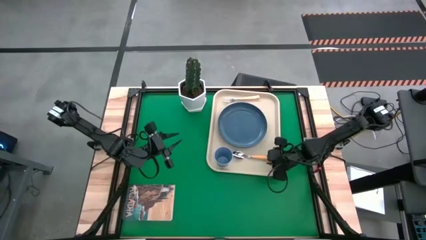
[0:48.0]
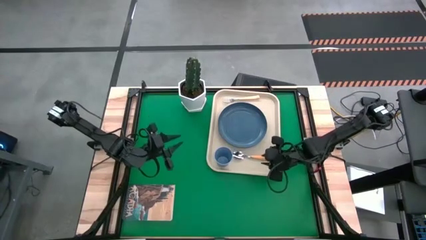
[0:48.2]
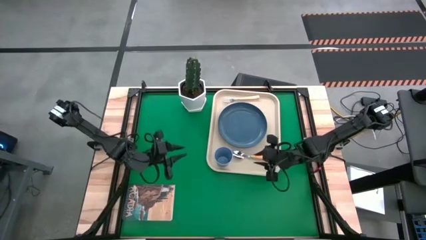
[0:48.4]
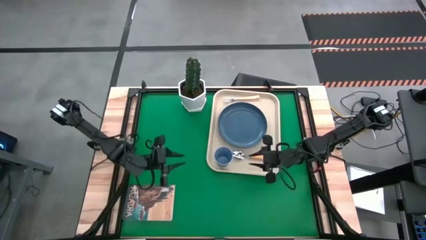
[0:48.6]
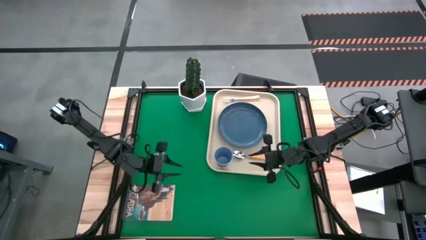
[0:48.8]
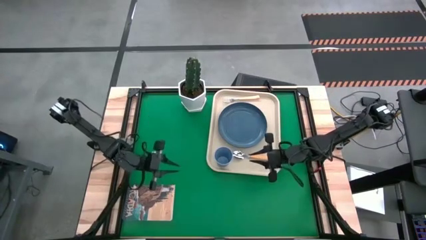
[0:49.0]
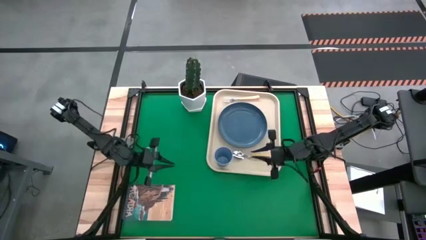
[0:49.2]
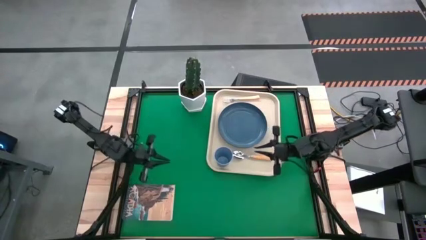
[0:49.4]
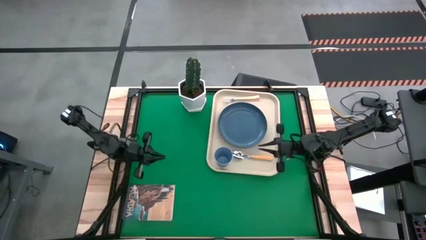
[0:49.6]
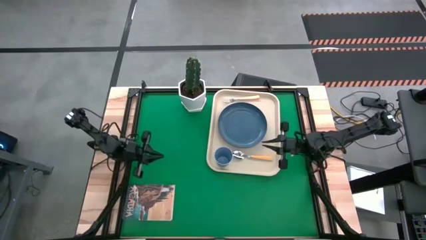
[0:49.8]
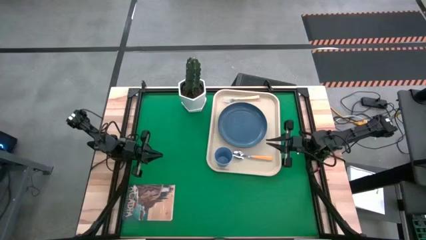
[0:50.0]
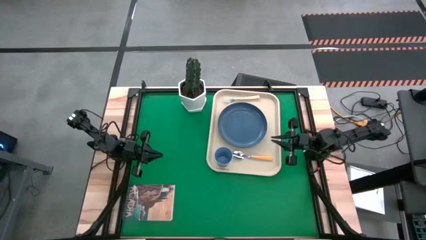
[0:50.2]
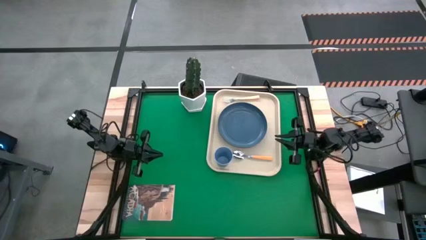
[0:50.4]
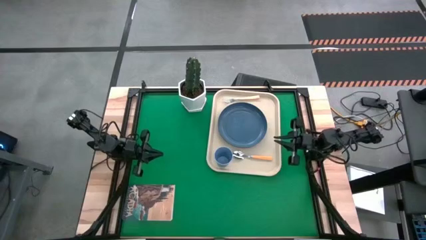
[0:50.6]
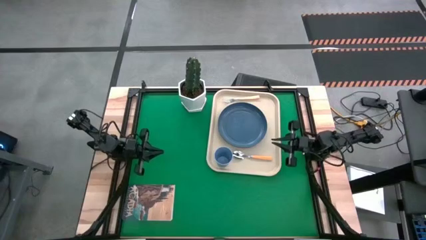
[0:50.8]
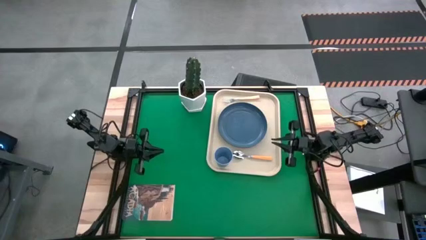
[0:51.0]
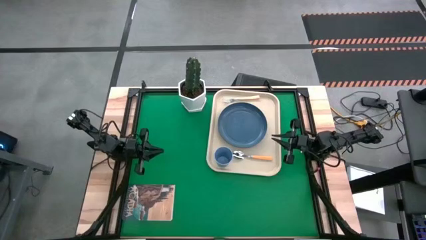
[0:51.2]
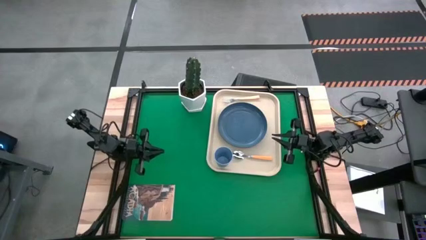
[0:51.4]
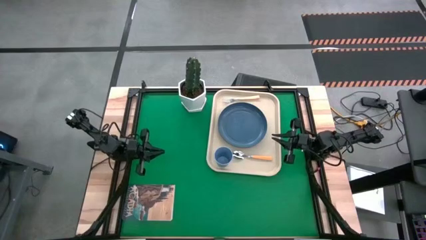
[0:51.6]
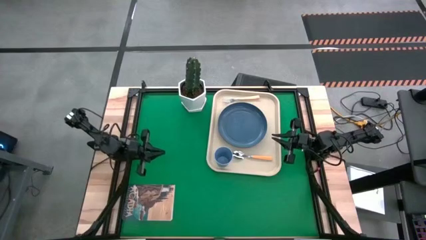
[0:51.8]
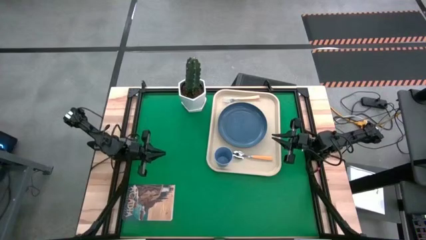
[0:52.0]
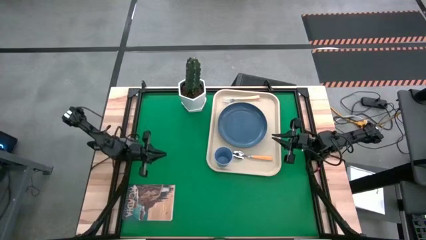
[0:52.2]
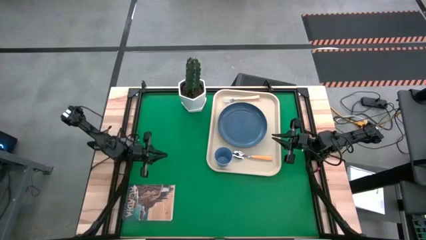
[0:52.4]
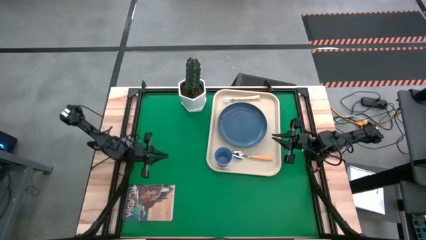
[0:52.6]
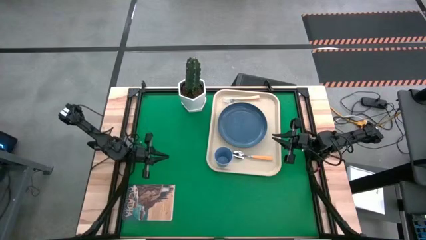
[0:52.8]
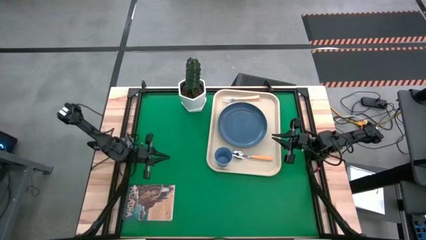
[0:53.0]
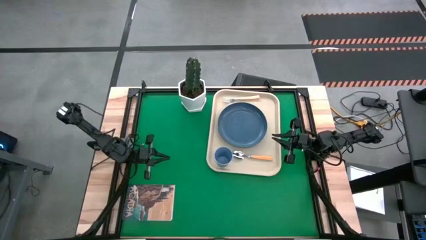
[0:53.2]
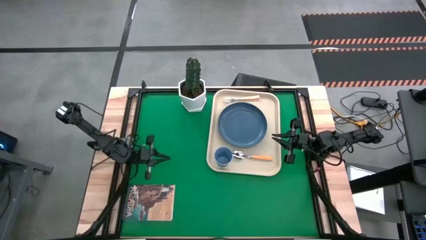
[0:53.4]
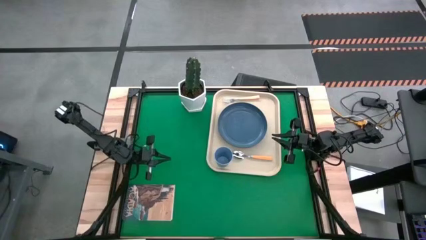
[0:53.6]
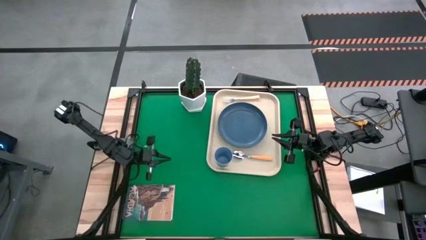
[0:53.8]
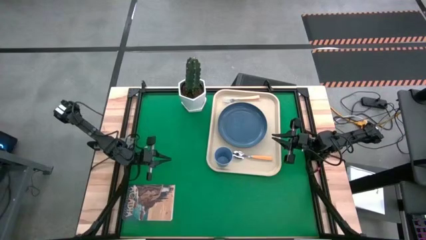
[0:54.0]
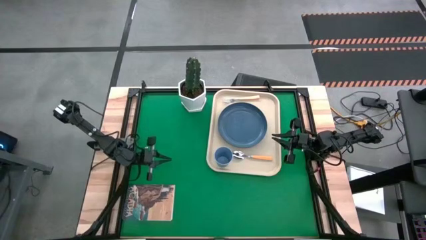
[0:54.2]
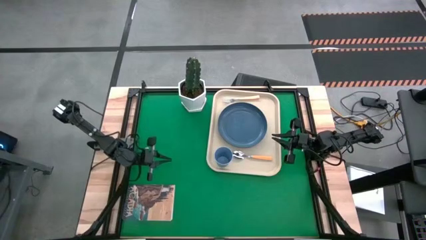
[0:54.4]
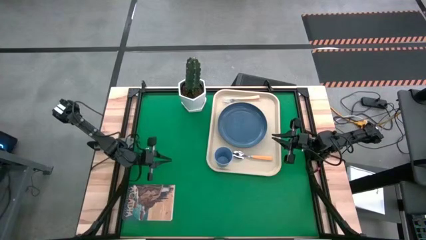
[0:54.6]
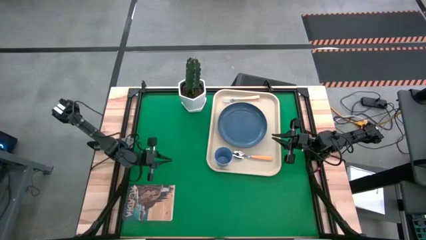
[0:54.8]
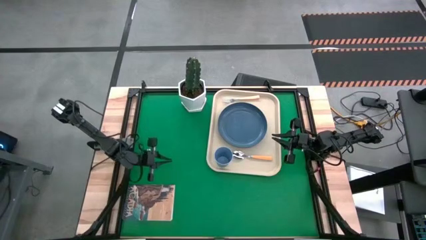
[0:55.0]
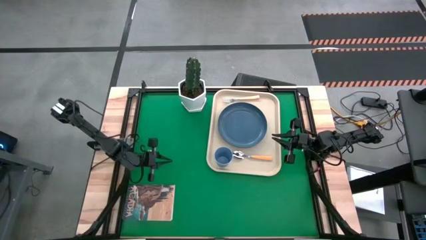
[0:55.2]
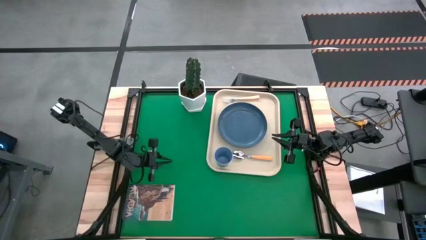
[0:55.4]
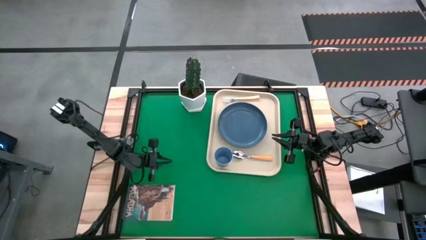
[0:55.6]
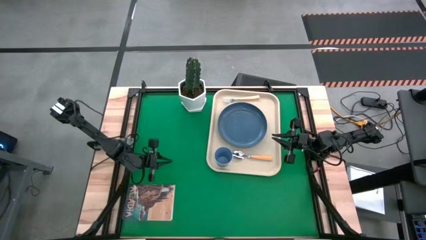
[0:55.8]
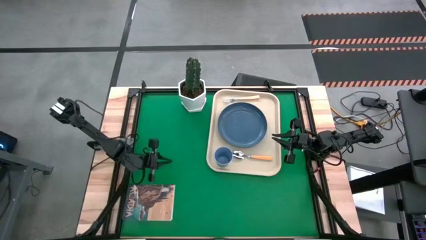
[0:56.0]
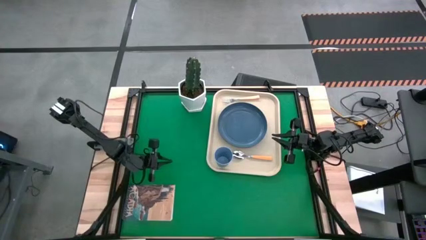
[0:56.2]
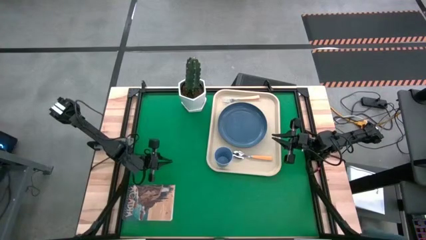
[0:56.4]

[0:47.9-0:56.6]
Task: Pick and place plate/cup/fork/spoon on tray
Return to Home Position

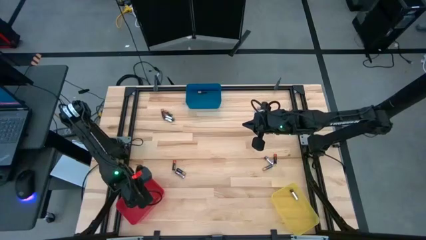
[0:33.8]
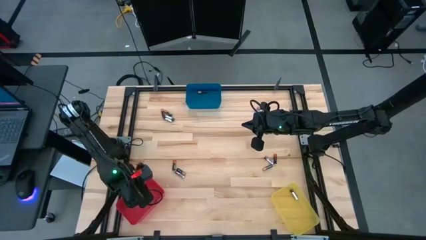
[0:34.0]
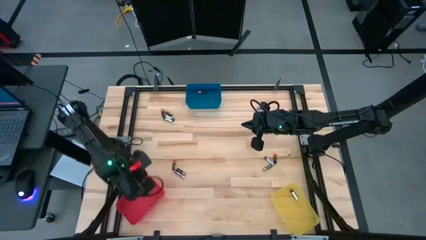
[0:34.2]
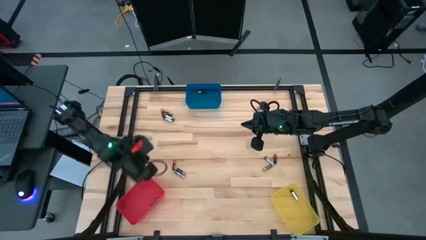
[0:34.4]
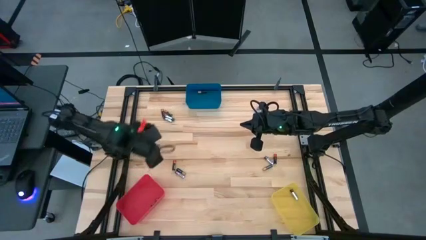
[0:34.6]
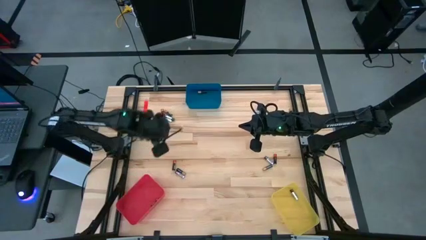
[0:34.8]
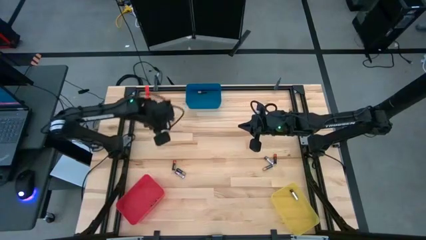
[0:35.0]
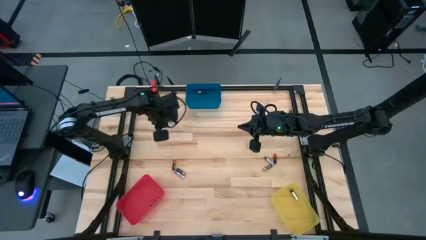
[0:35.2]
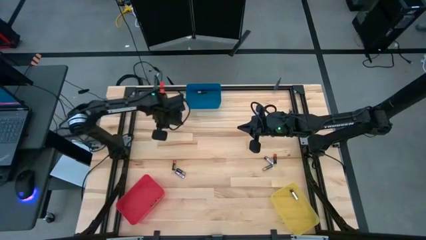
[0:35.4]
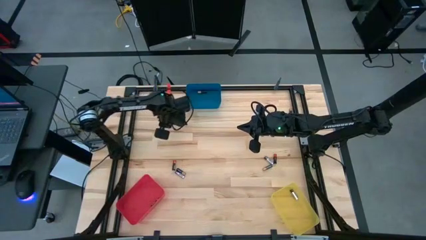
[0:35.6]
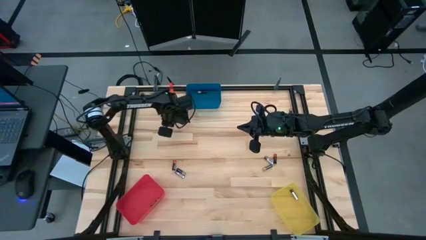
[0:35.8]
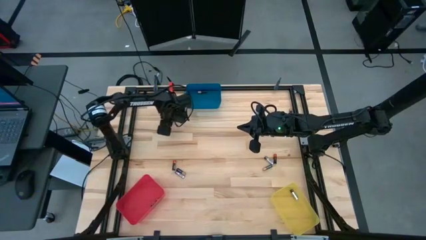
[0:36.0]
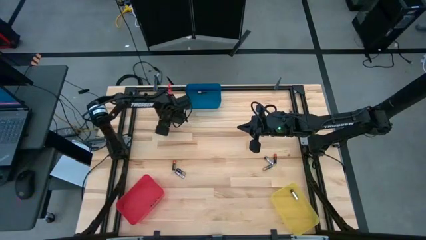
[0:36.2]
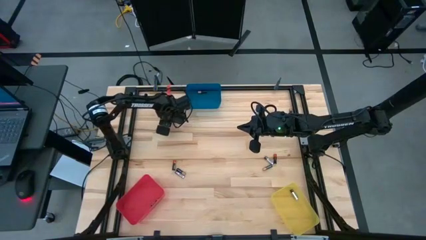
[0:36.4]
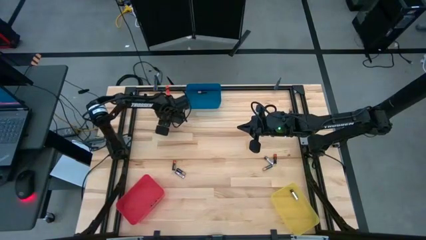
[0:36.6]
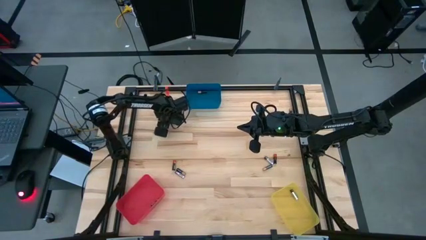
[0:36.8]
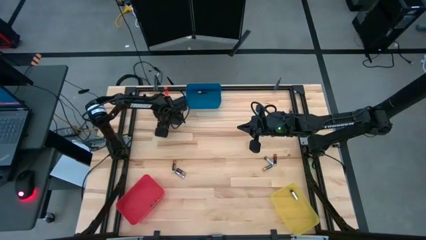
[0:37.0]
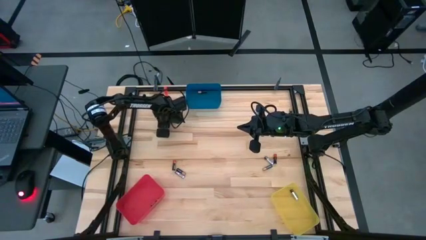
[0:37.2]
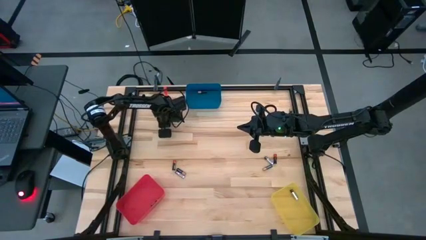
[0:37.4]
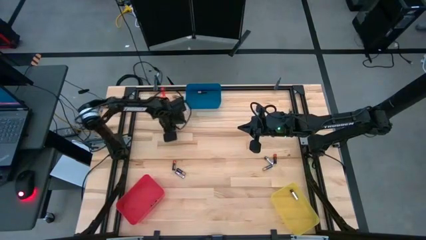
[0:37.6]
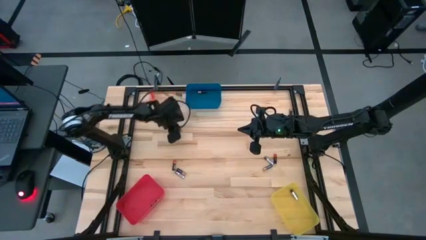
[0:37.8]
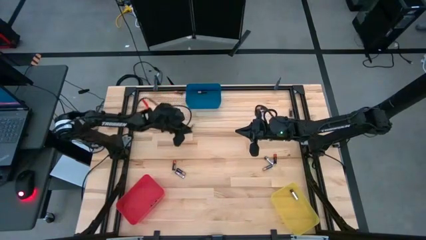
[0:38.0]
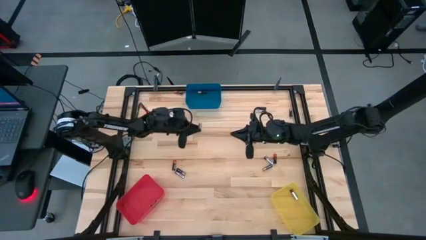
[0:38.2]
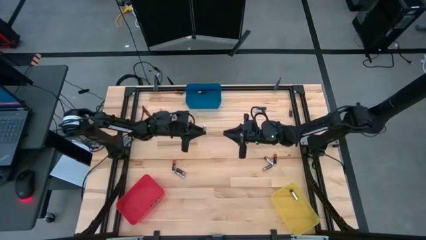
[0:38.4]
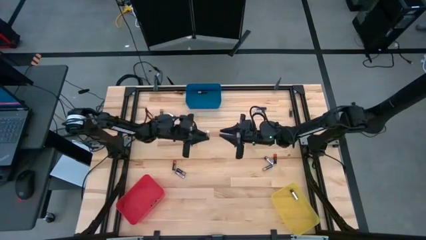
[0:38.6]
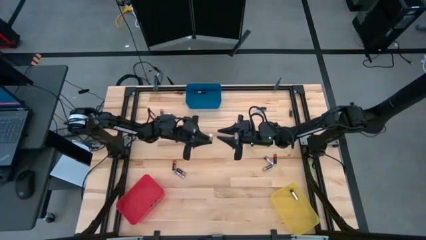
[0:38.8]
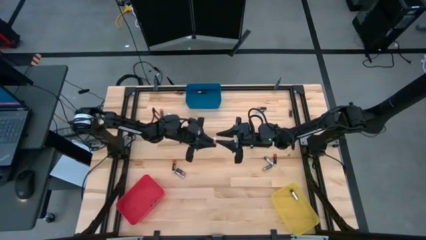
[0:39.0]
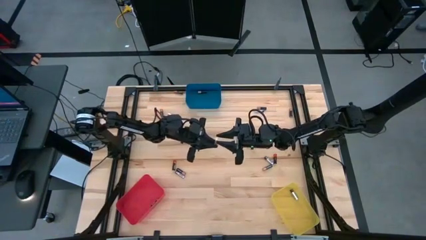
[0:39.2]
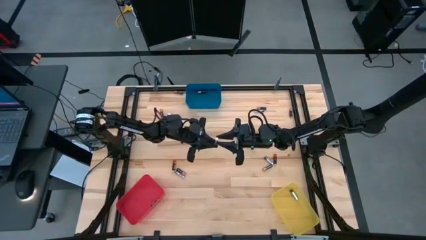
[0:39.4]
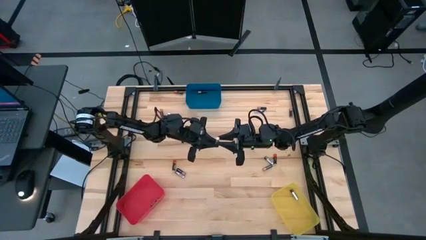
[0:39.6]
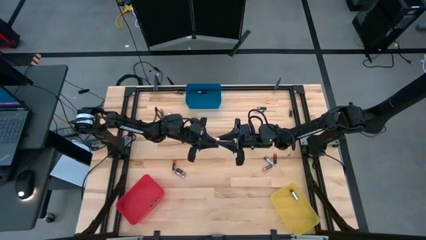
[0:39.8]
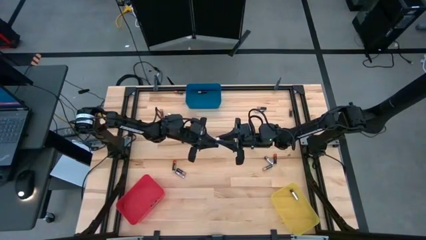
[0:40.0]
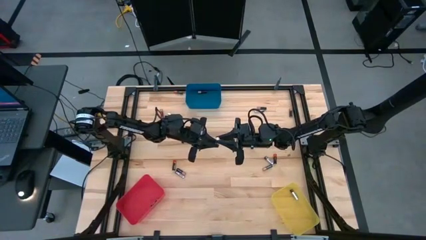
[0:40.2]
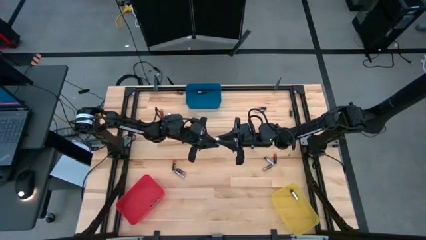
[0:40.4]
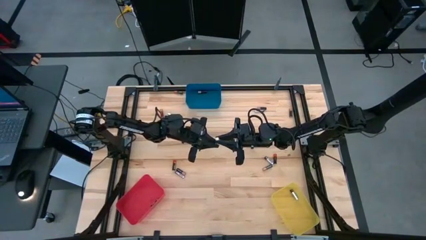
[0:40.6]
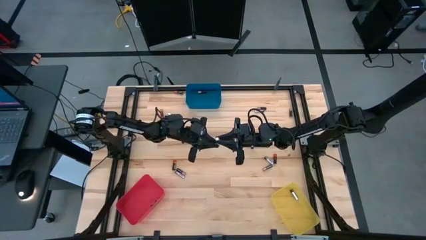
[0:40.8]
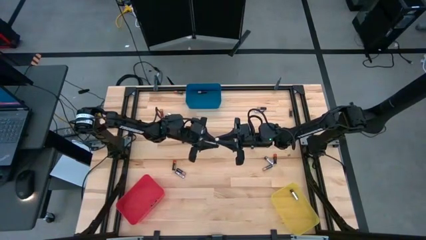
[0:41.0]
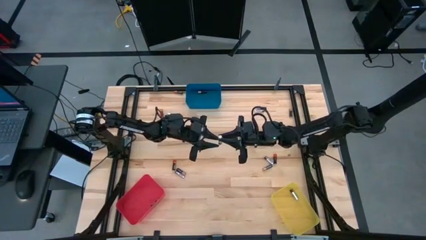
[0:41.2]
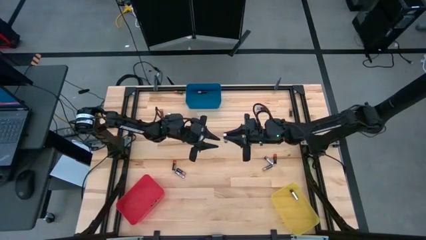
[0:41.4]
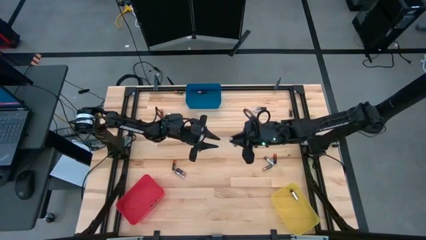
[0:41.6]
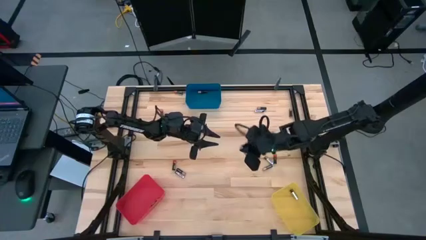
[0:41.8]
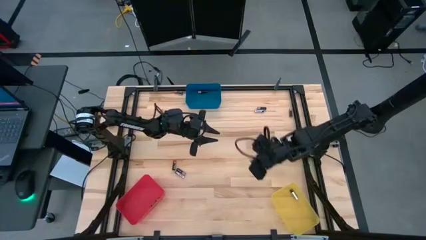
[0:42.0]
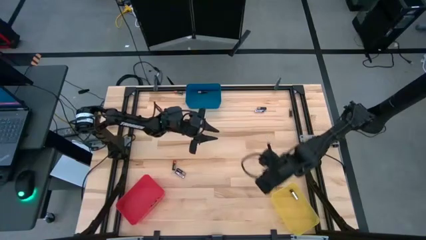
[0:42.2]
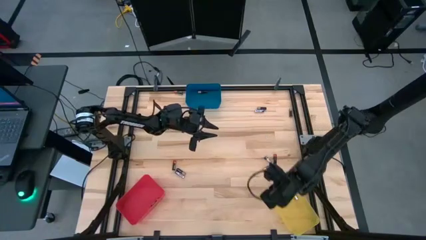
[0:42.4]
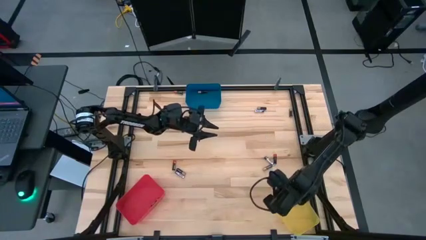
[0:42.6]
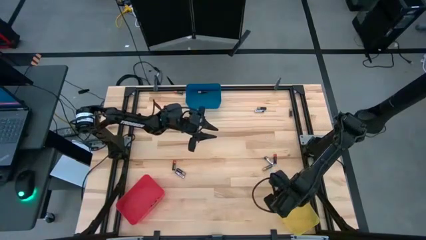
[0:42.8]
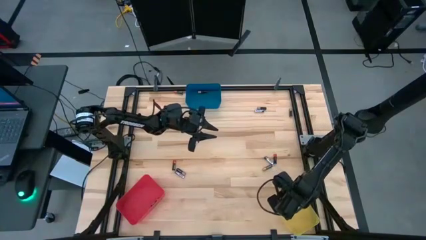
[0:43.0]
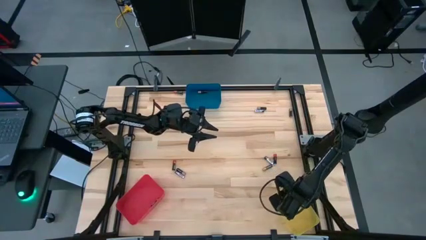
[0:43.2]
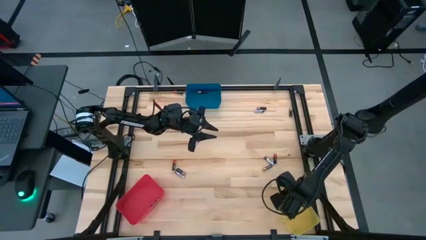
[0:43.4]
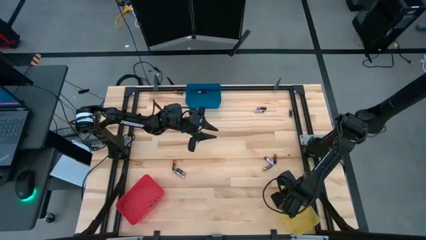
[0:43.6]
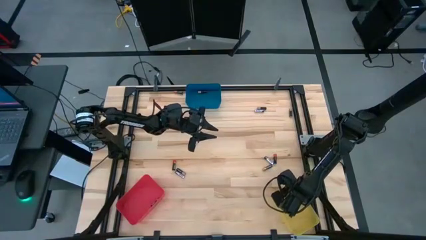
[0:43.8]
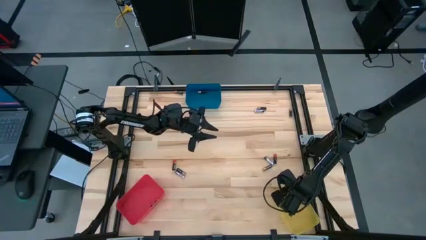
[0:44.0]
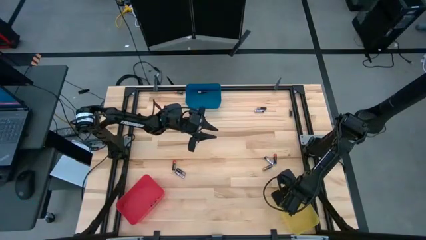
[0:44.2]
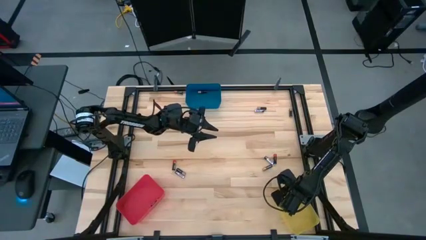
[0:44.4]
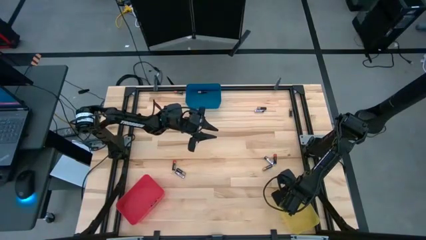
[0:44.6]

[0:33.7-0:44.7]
Task: Sort batteries
Put the silver battery into the yellow bin
